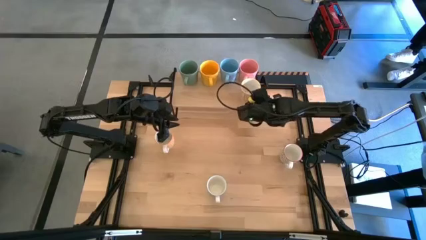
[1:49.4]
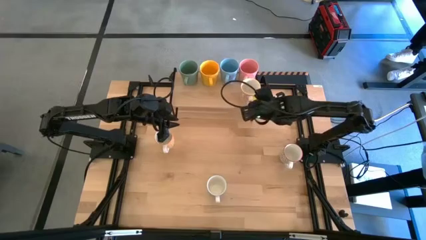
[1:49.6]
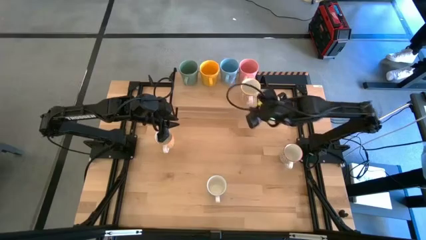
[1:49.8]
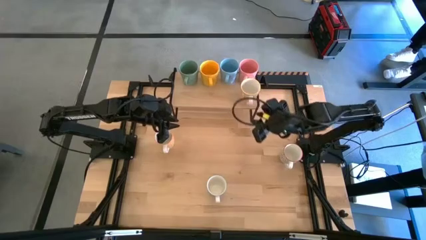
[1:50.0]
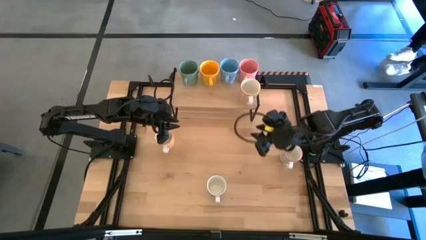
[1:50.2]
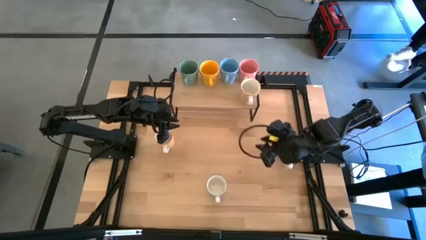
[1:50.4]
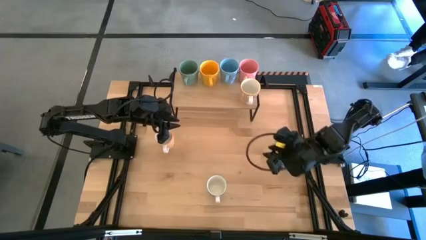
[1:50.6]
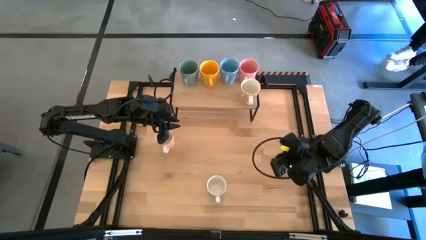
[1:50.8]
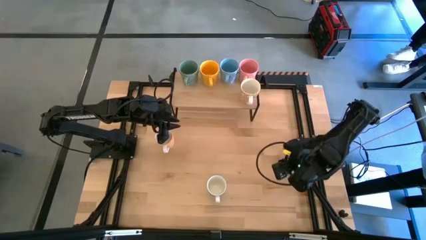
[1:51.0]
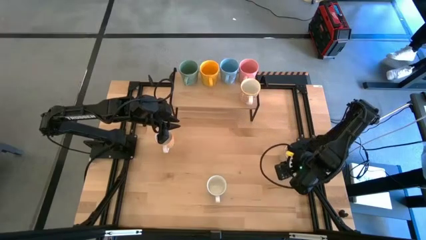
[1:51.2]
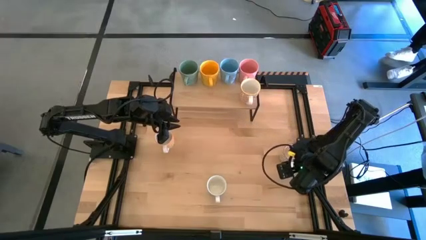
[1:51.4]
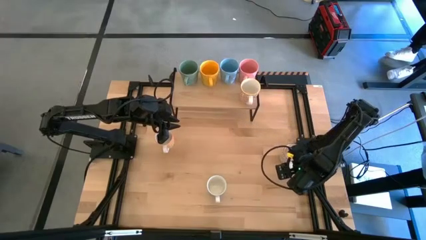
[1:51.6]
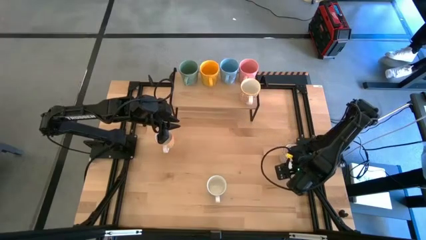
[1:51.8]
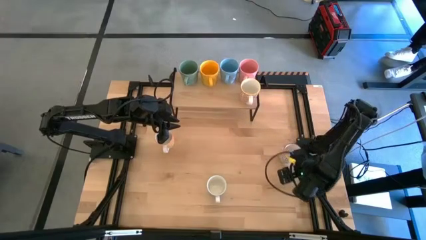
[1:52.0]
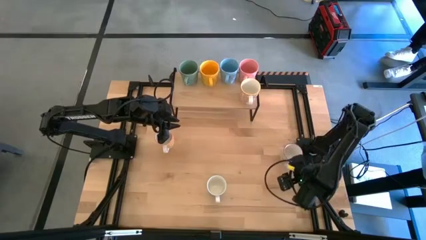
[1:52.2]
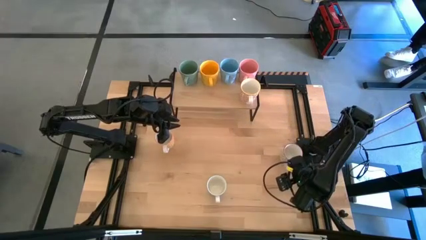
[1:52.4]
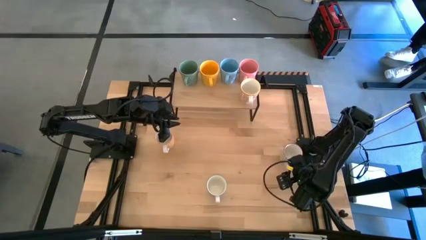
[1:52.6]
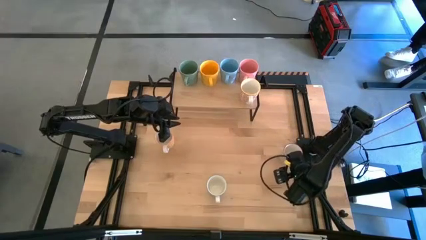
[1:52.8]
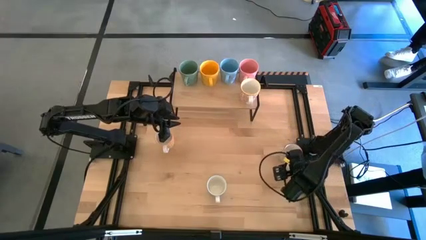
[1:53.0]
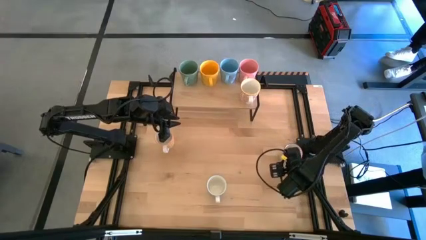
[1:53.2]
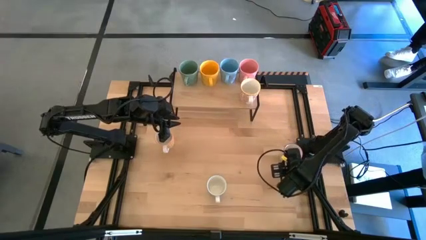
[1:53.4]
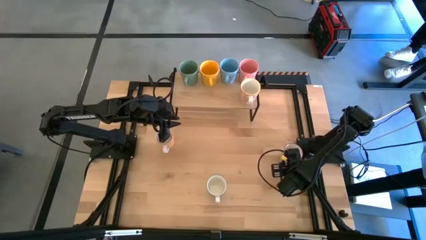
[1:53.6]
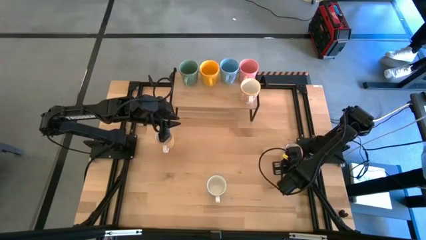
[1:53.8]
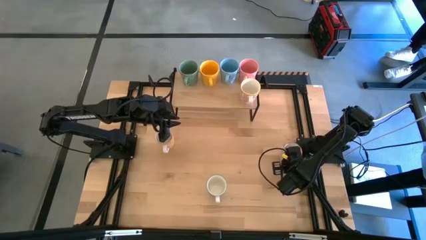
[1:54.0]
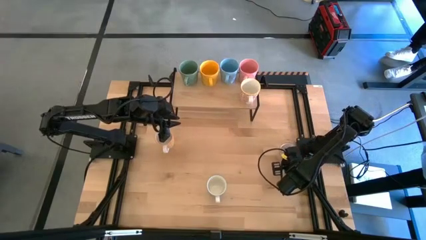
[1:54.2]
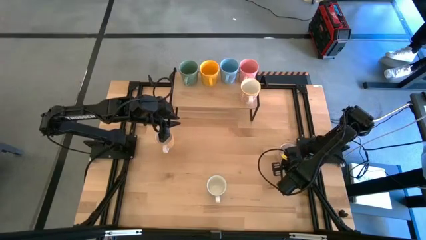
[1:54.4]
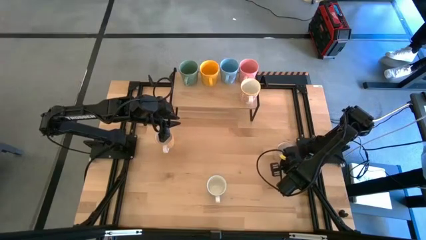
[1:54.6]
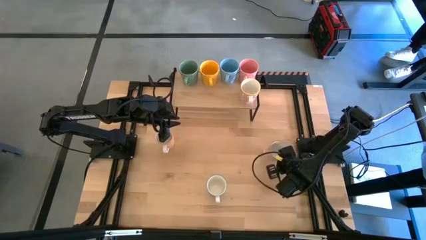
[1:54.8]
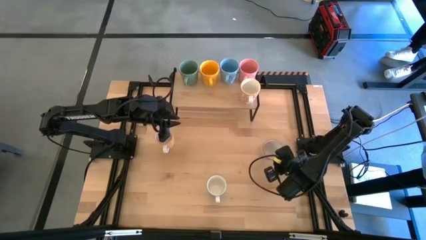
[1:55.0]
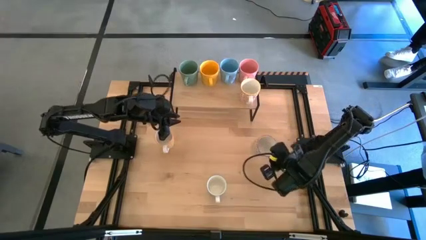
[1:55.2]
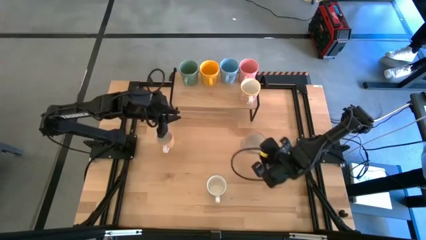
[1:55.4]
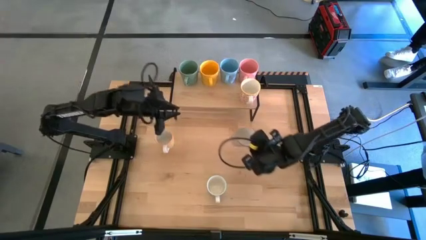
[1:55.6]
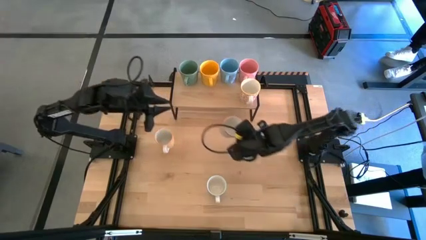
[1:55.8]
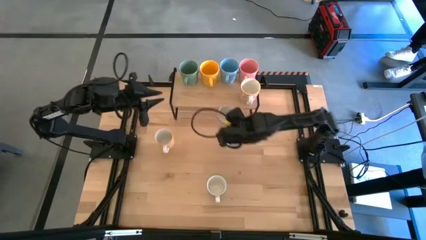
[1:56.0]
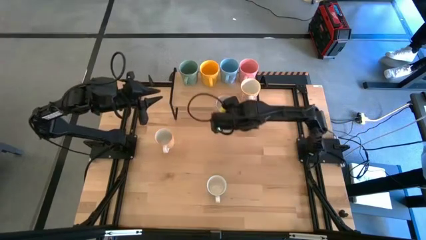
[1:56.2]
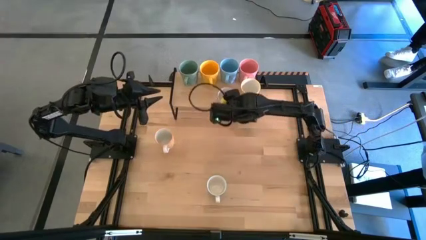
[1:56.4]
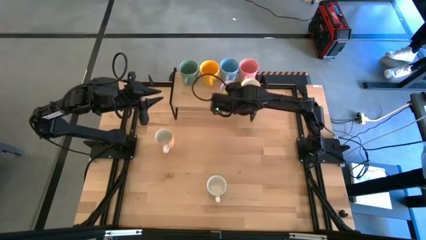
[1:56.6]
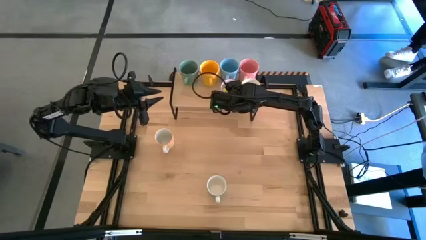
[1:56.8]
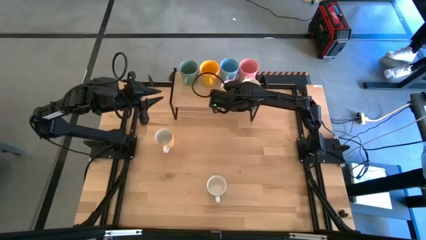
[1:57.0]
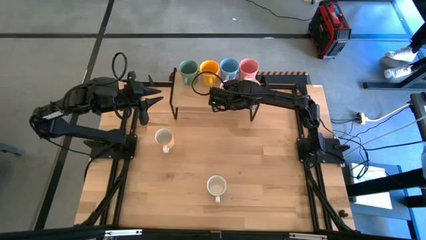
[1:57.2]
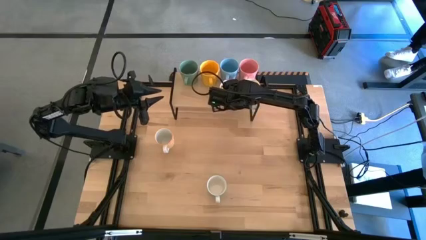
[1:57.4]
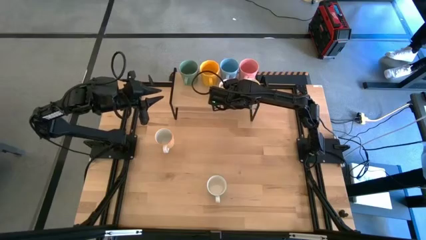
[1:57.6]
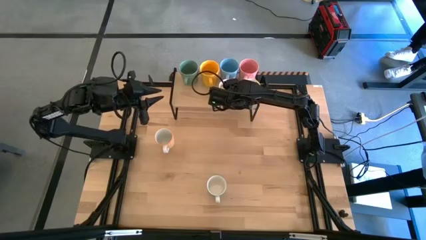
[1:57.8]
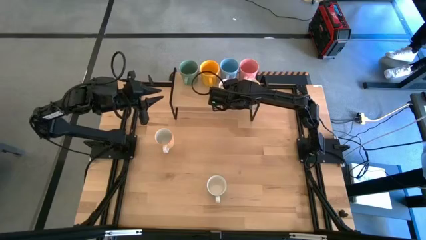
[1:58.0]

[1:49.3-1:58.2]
Task: Place coffee mugs
Put the gray patterned mug on the shelf

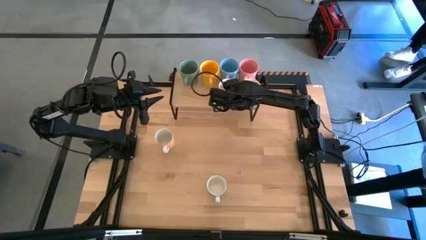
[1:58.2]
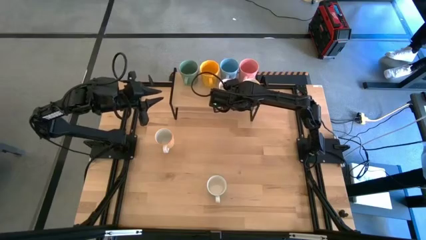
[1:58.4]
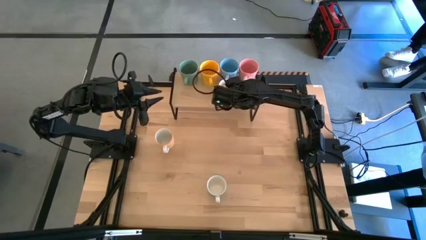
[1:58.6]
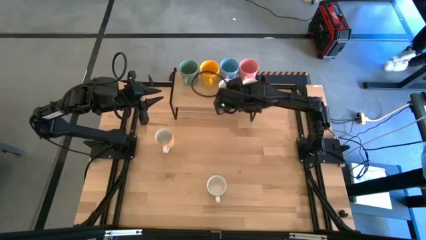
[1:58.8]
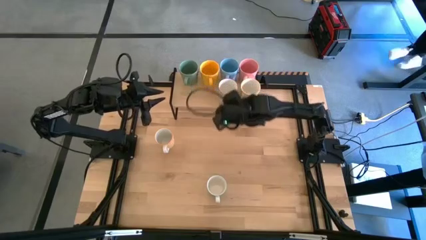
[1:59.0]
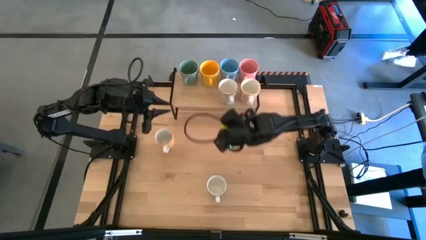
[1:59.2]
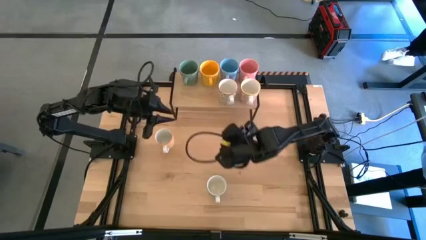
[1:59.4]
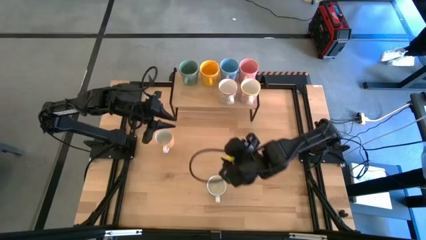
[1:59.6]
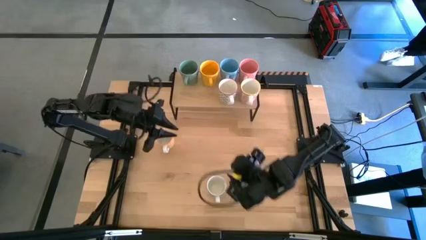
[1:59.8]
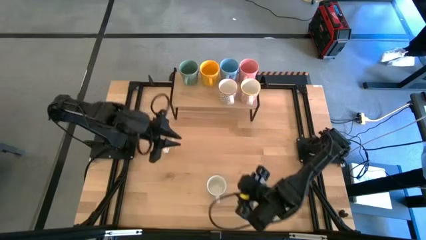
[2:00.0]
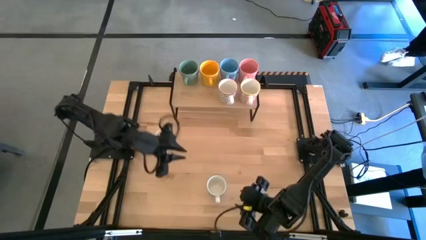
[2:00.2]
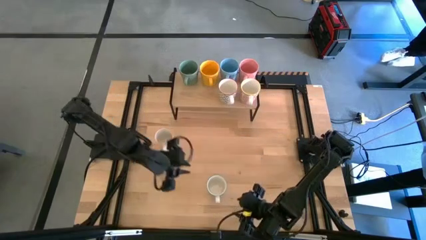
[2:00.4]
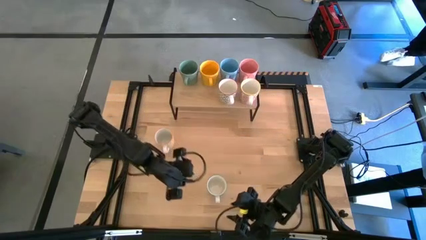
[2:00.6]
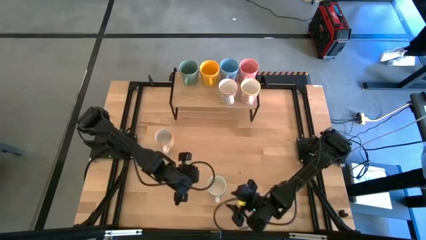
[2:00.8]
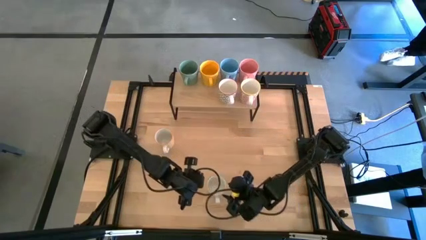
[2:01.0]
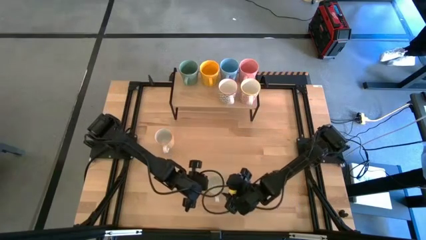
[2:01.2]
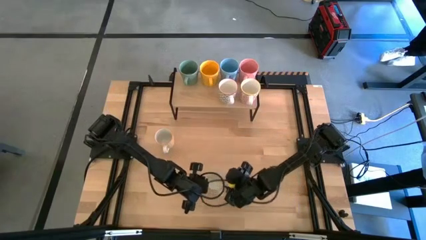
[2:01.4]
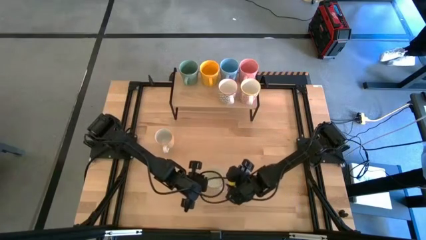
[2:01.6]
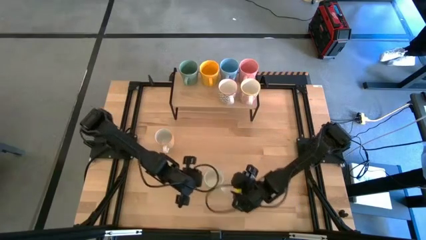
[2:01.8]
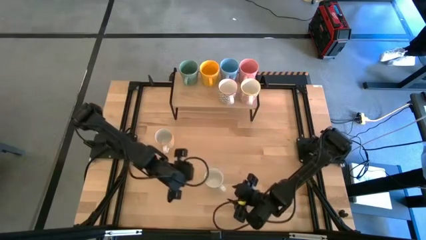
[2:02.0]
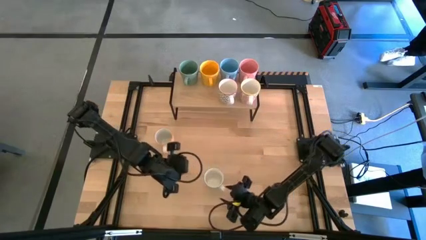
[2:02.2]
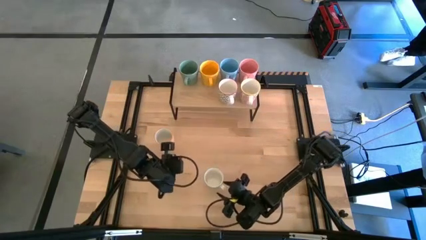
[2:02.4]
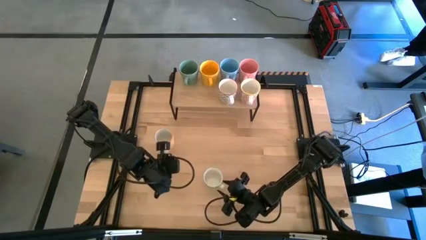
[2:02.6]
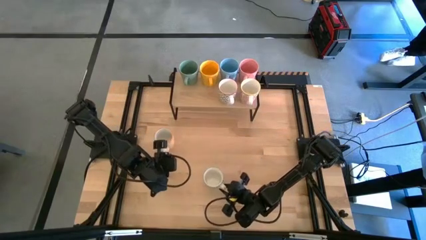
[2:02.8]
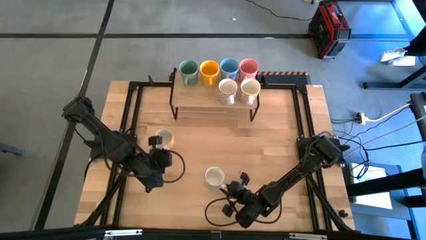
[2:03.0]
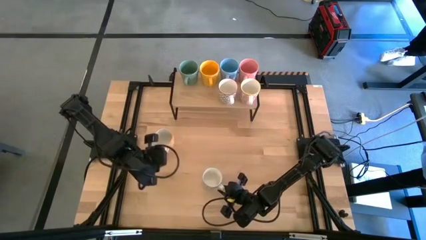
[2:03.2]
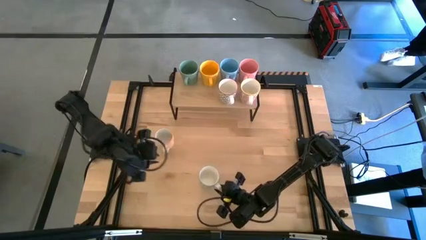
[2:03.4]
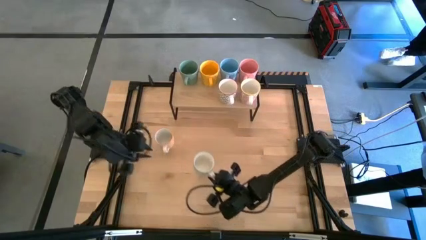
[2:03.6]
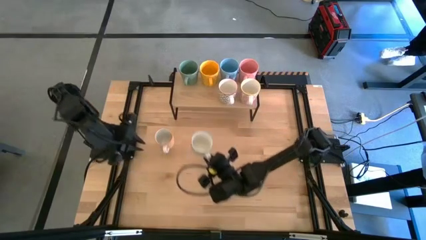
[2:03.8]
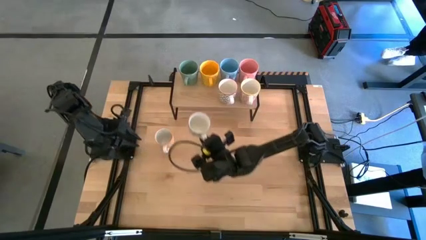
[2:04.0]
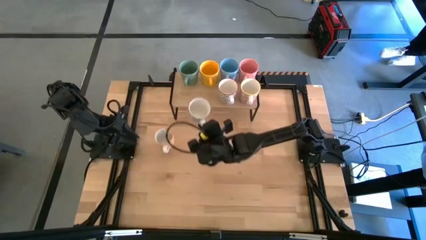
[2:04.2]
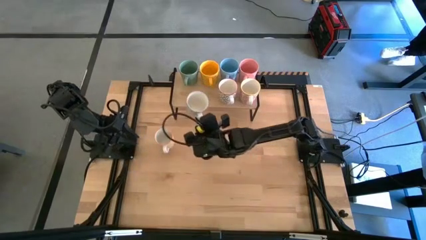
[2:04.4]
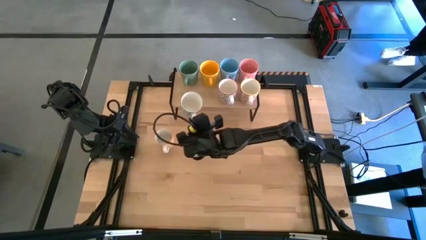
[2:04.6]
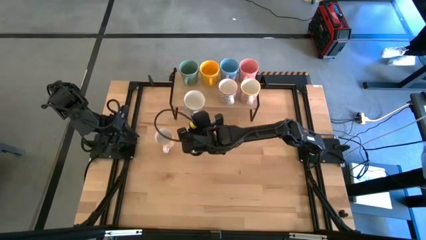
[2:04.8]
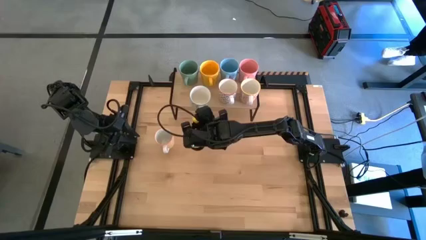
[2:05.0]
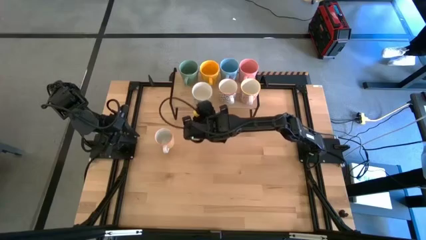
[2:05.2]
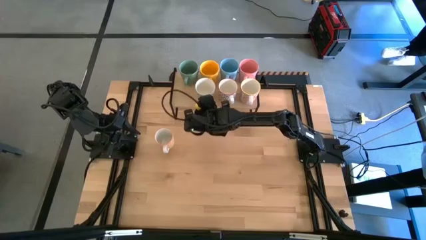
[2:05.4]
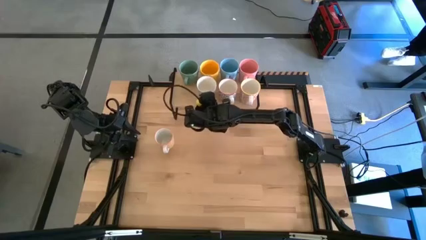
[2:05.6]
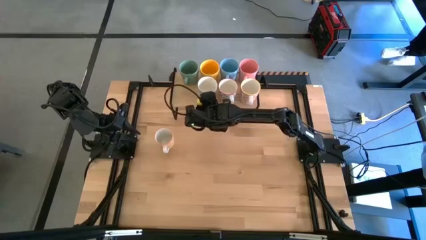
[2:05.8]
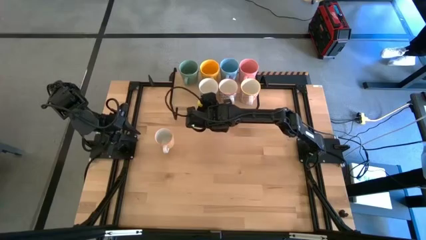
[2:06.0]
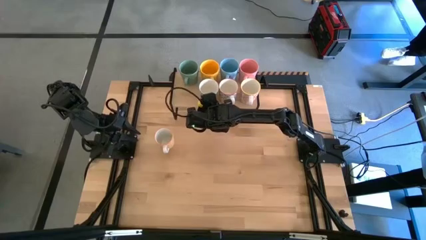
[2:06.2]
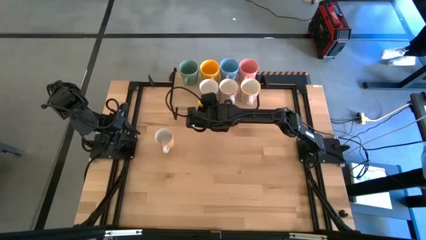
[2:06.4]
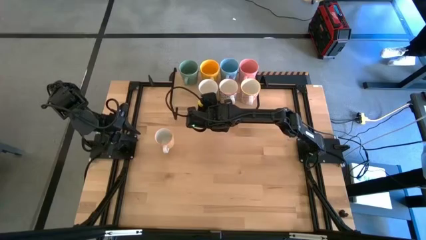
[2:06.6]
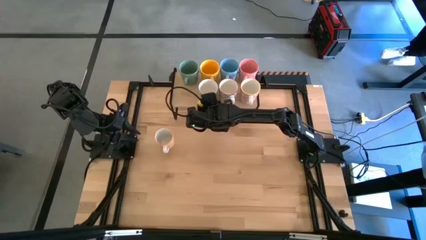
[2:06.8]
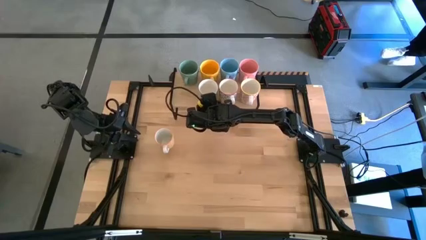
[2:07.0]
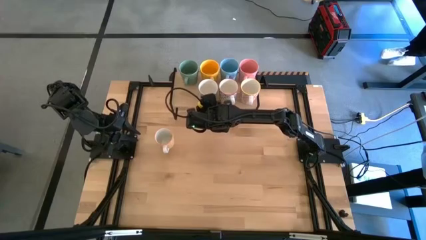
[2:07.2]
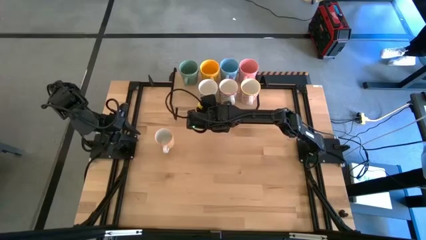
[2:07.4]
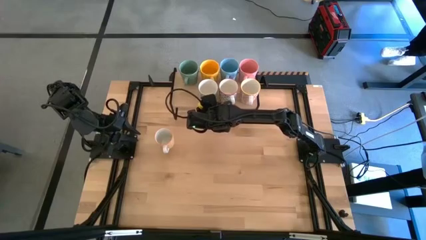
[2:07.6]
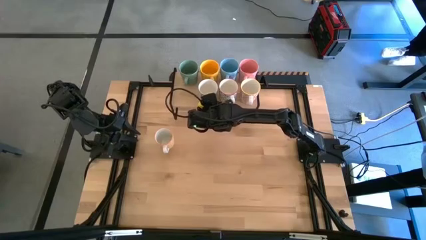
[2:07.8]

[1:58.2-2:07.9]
Put the blue patterned mug on the shelf
